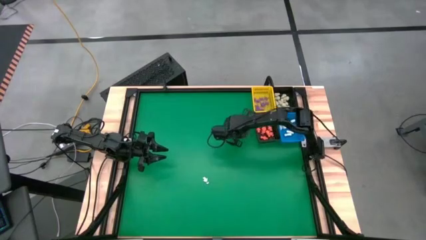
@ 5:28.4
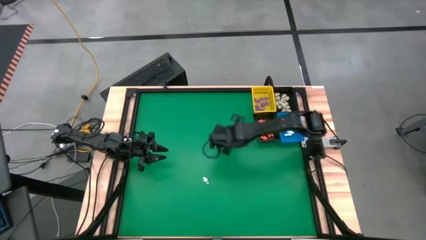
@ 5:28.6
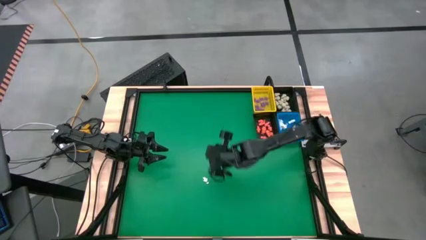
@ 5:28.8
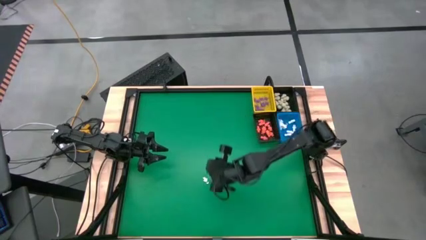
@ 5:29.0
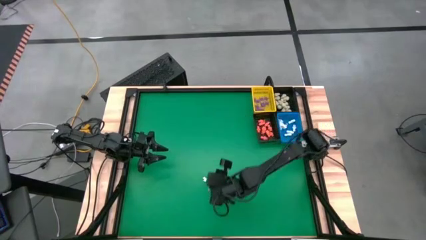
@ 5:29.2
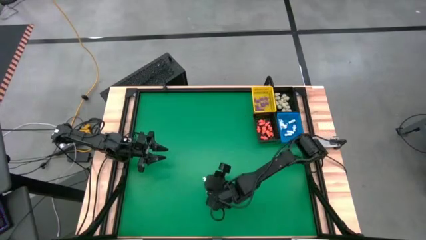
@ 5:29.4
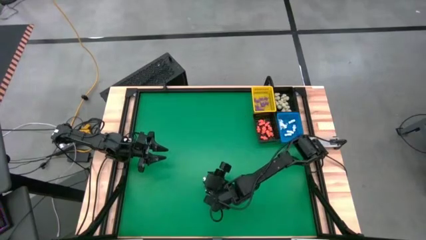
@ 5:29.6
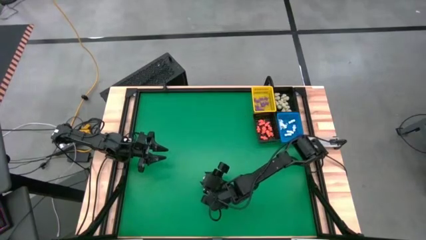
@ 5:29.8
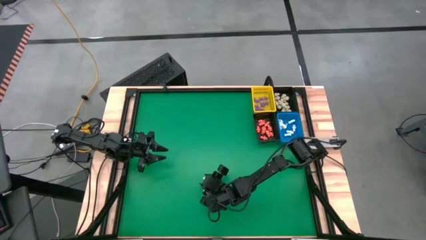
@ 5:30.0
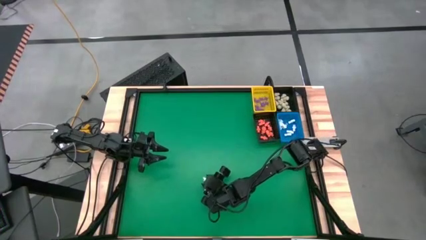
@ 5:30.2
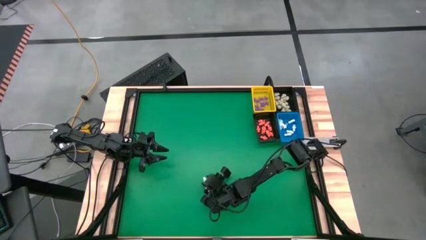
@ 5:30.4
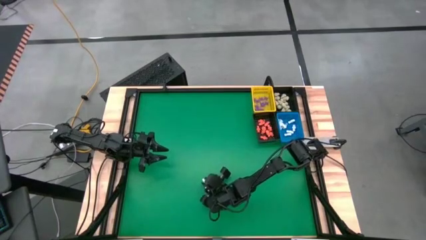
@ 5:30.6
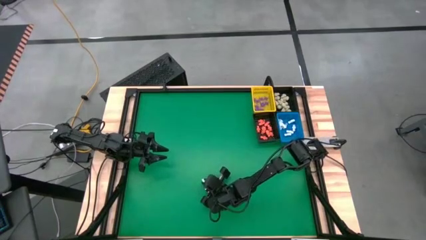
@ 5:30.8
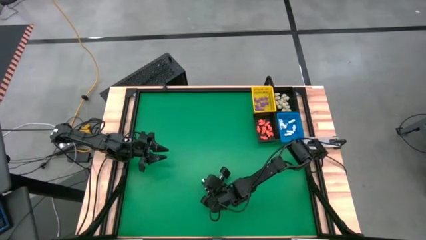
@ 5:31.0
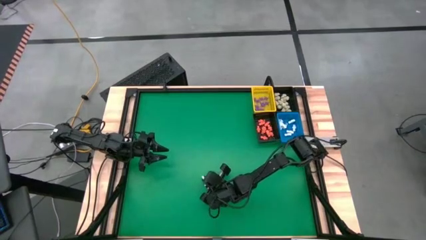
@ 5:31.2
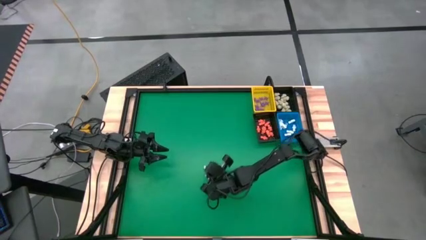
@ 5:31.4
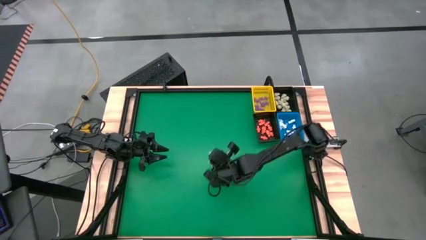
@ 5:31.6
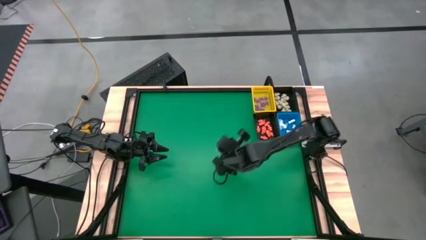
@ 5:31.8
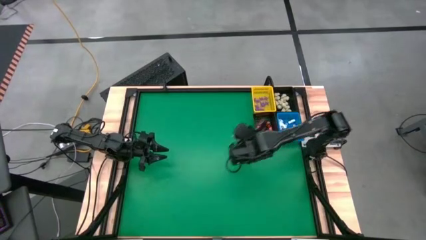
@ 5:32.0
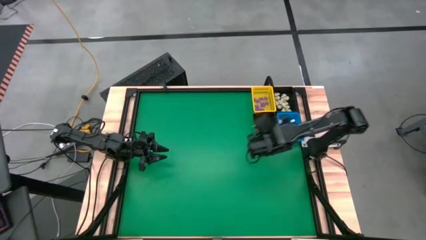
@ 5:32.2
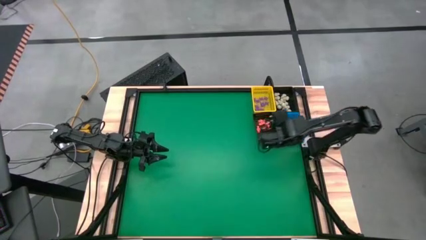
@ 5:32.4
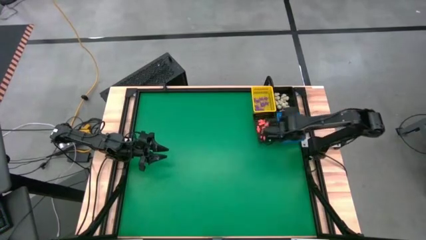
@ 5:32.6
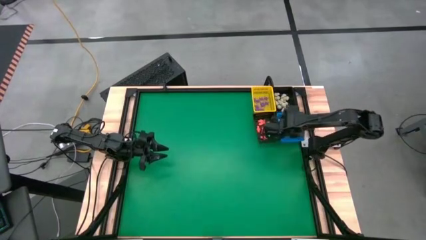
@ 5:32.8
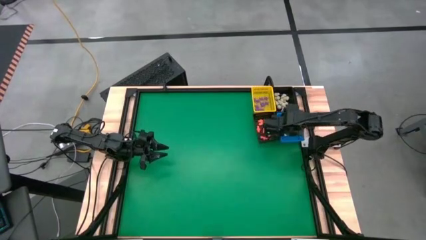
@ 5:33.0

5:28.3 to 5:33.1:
Task: Sort Halloween decoration
Put the white skeleton toy into the blue basket

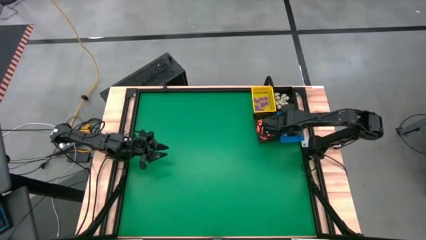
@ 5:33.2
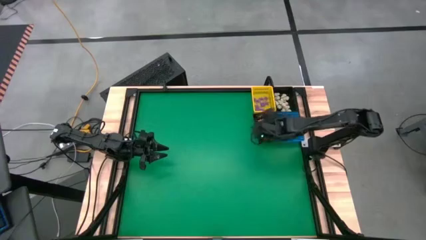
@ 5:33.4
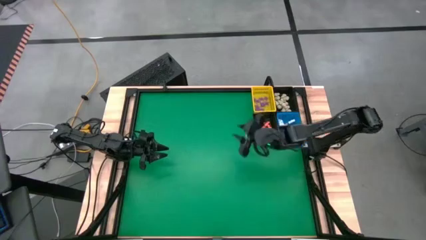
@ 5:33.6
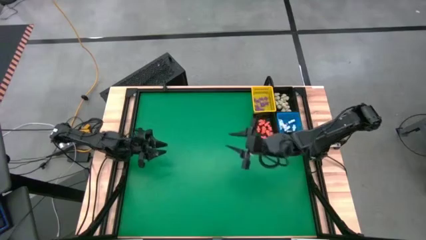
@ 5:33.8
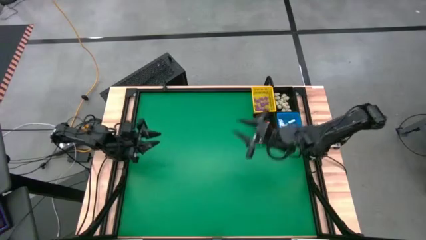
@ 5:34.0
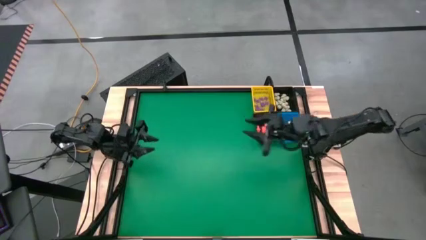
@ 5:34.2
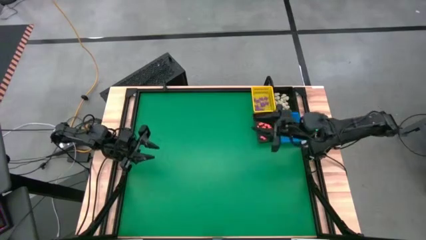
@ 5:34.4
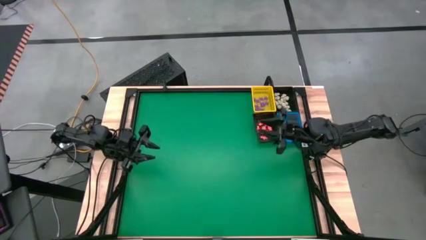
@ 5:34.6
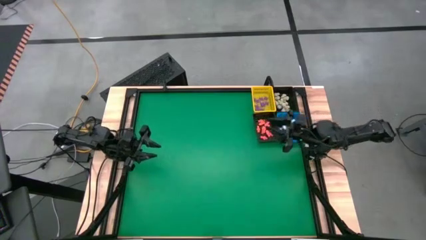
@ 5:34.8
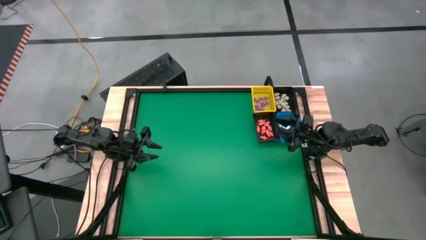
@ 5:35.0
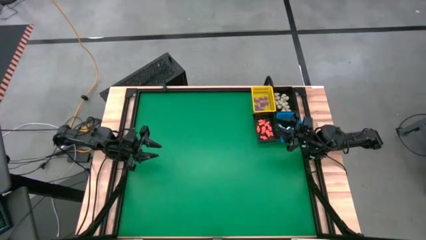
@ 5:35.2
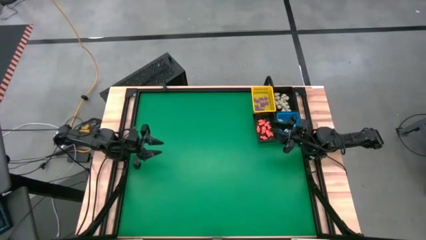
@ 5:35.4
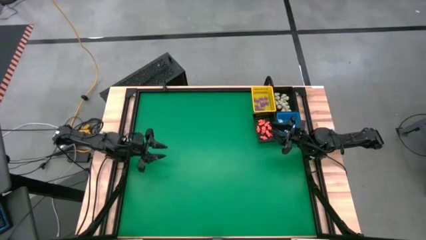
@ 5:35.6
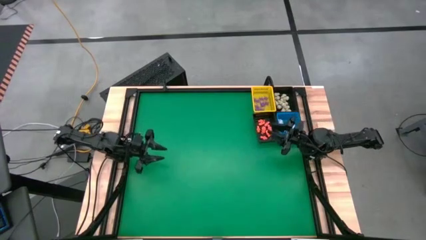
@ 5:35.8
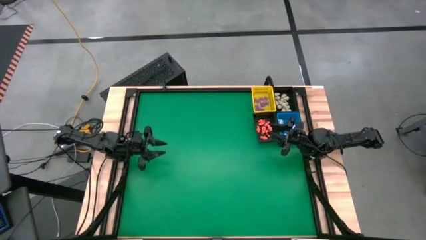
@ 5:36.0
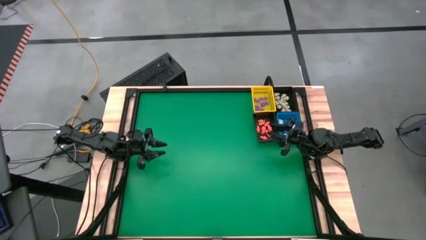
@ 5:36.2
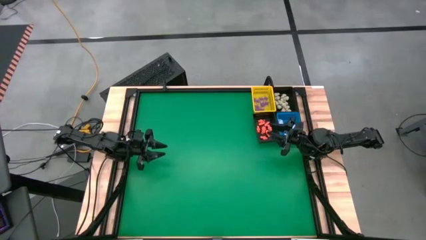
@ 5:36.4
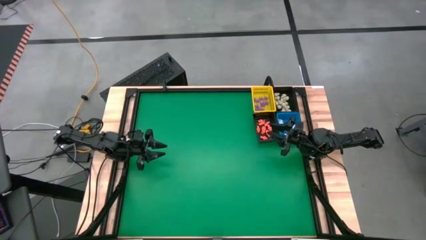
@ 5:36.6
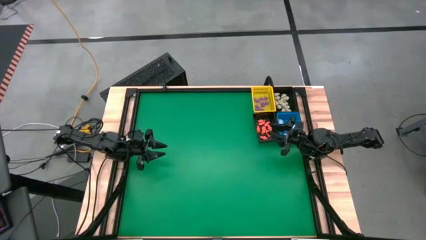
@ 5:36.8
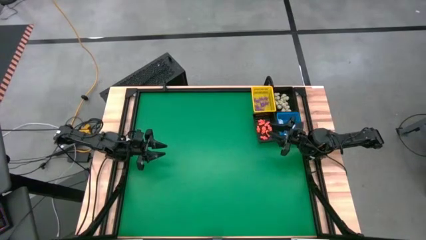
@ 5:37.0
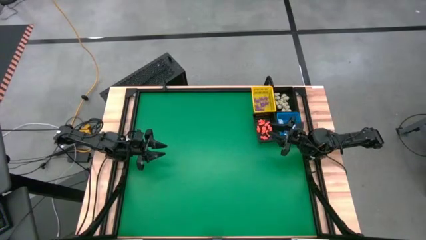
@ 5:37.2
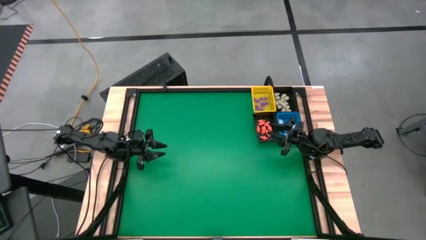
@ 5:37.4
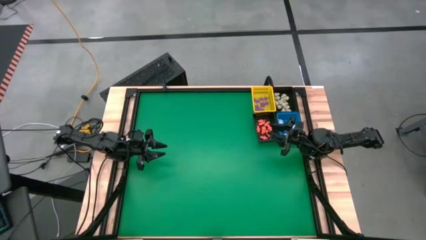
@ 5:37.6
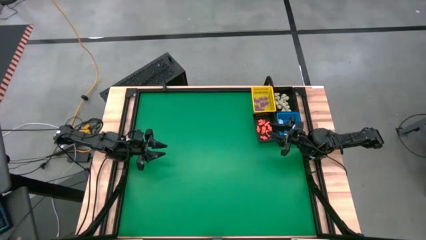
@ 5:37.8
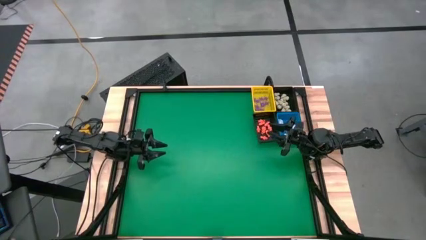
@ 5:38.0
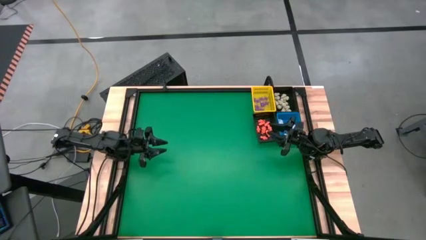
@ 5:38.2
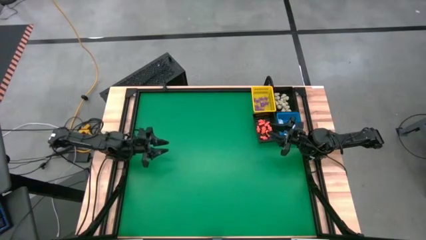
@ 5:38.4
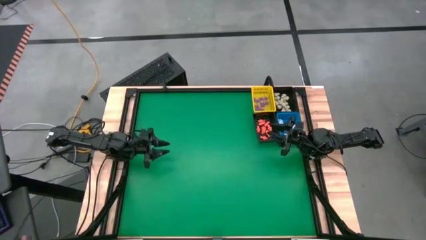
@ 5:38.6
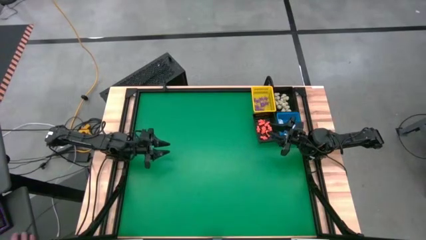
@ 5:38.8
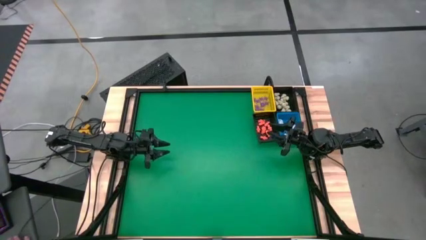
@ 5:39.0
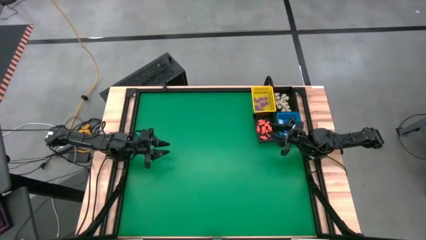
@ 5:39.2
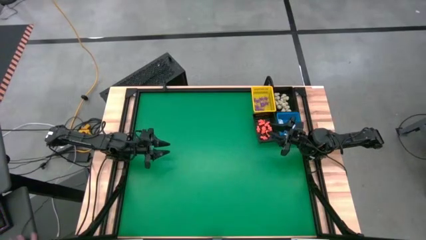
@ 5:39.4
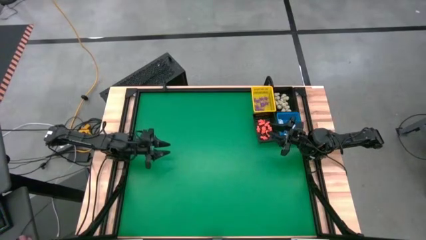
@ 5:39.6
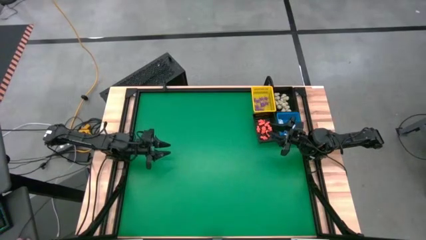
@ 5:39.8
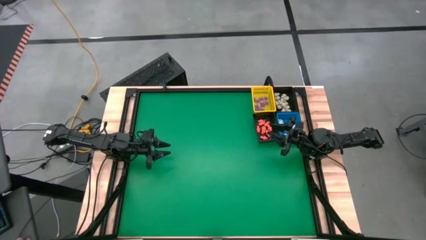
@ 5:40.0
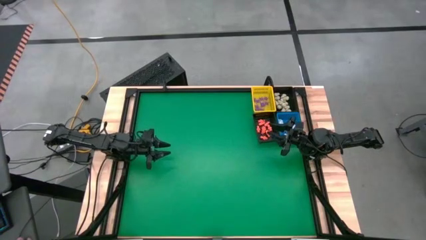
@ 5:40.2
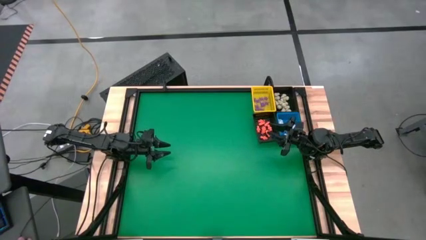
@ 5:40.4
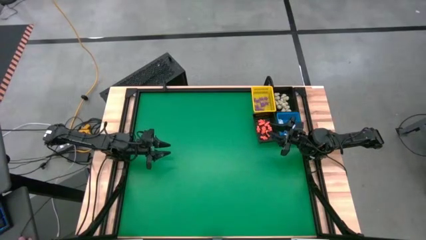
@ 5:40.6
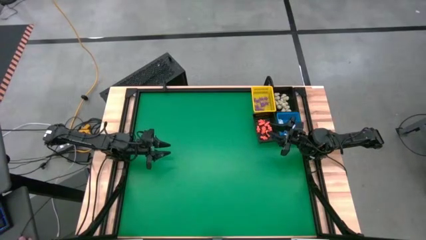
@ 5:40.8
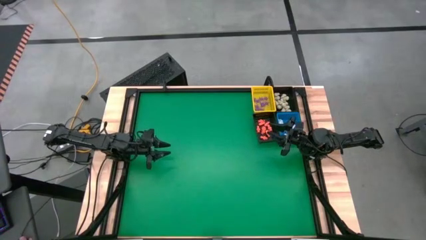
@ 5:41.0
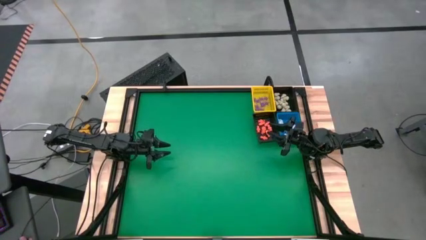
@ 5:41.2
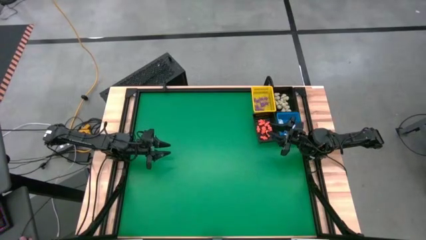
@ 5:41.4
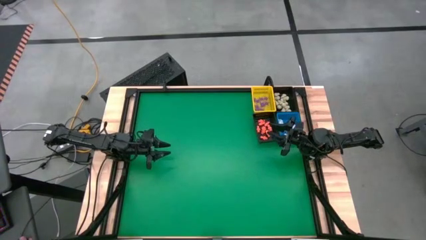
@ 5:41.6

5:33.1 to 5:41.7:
Return to Home Position

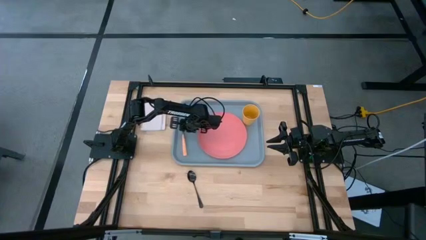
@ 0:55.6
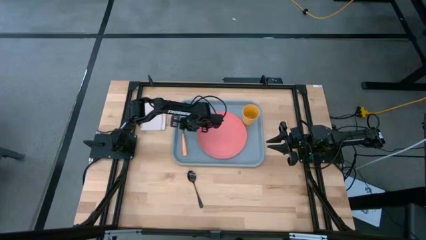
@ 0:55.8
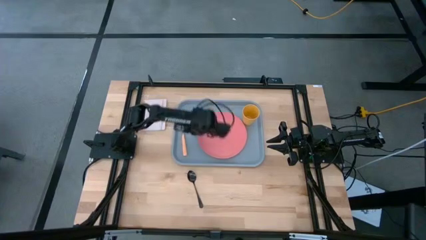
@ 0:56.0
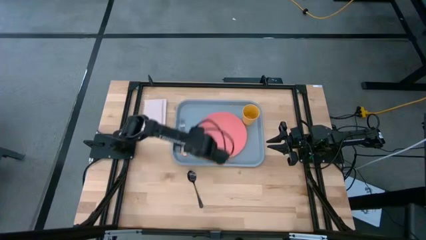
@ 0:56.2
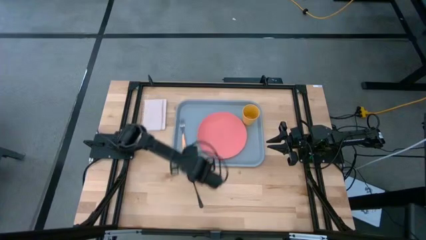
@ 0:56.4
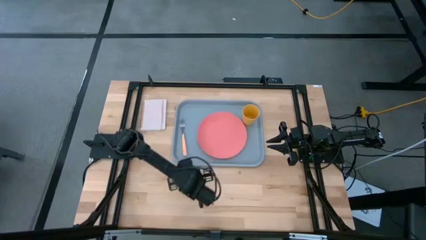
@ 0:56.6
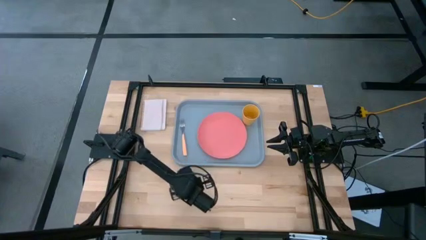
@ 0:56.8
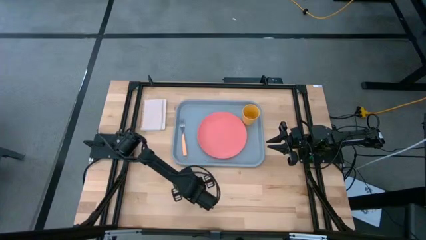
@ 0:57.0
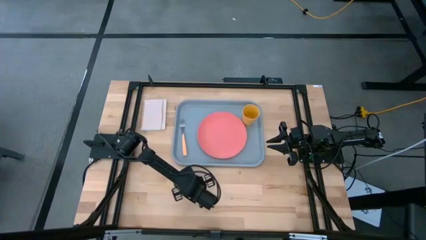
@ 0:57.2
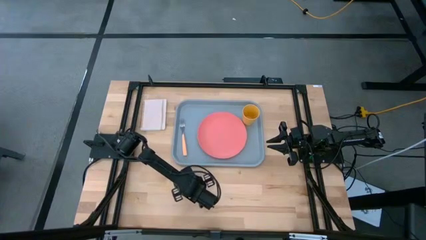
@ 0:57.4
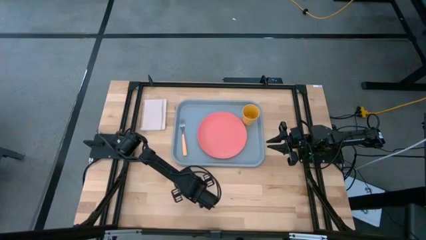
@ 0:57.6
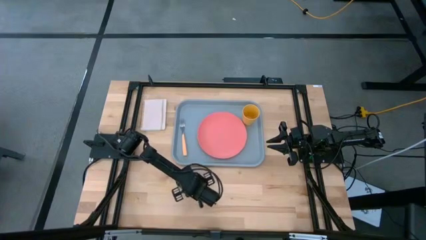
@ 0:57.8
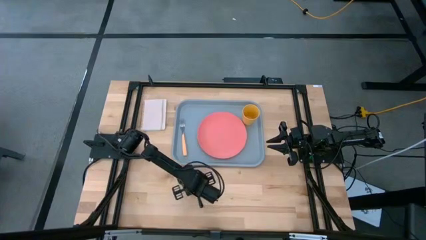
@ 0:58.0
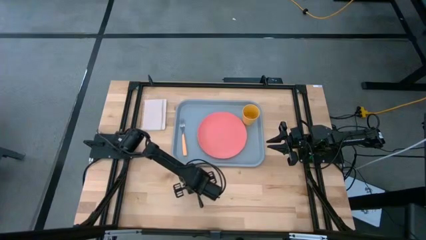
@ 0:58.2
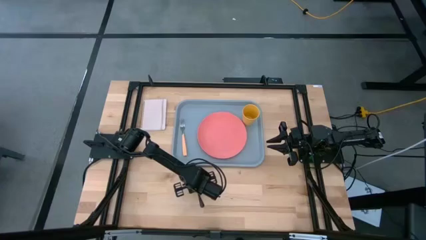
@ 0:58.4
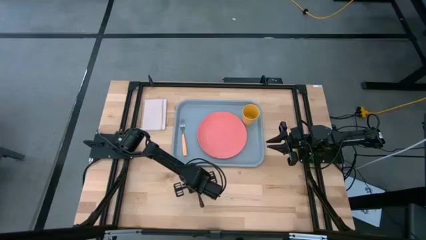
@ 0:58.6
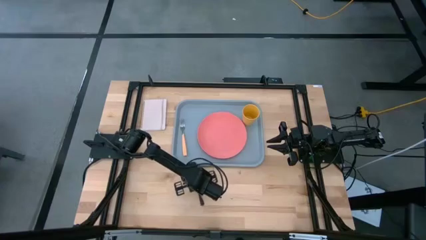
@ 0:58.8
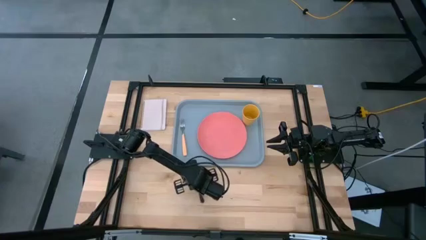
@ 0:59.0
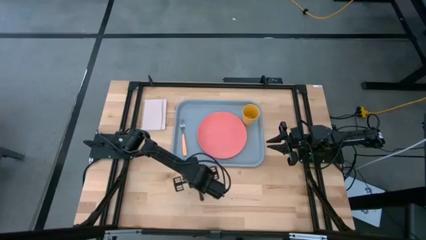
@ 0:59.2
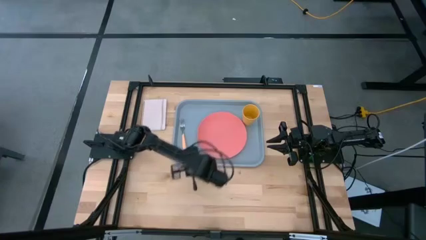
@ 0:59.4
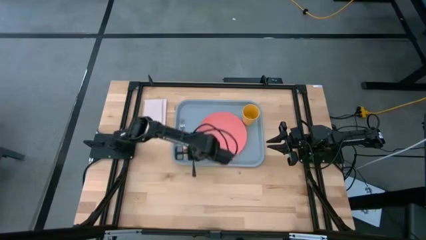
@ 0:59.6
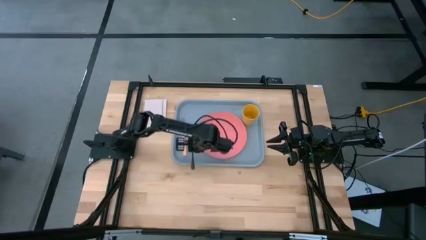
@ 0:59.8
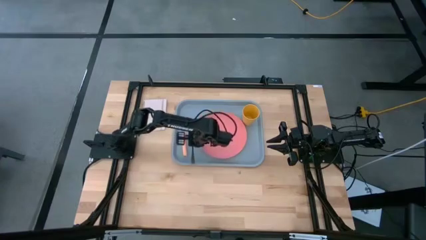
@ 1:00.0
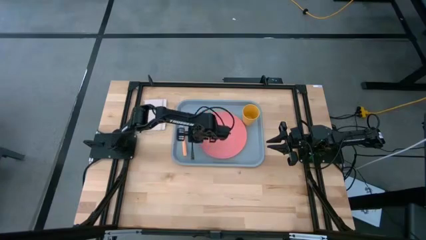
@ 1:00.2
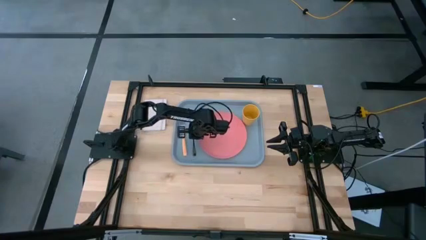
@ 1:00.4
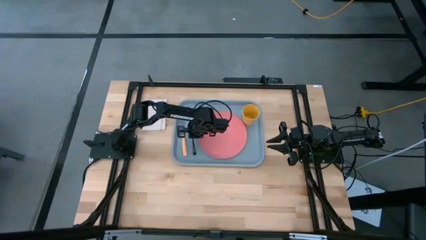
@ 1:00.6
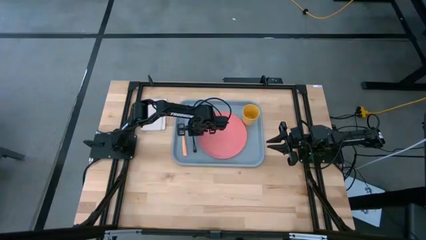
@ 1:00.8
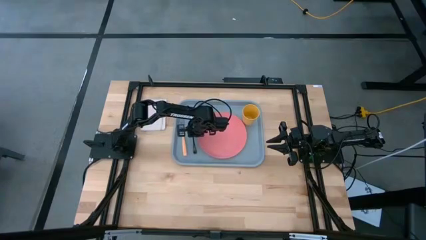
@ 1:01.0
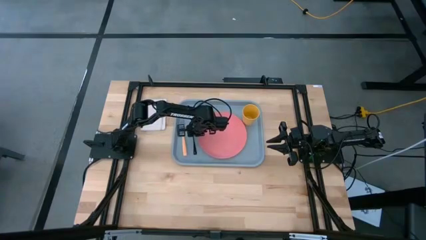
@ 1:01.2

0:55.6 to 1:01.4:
Task: Pick and place plate/cup/fork/spoon on tray
Put the spoon on the serving tray
